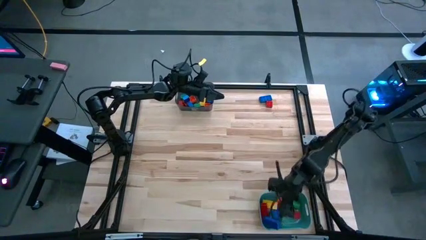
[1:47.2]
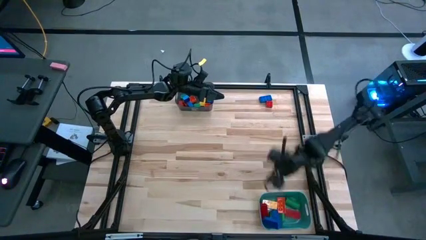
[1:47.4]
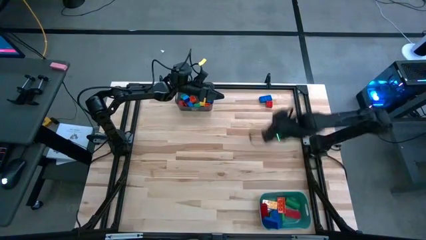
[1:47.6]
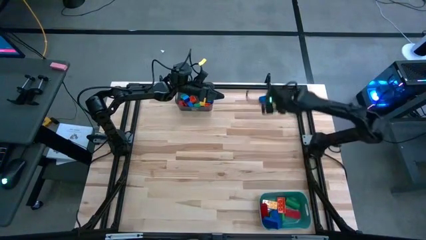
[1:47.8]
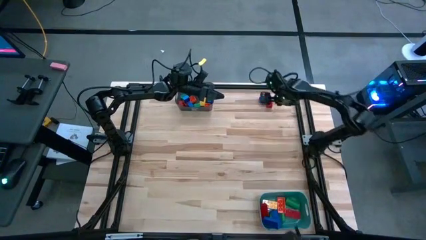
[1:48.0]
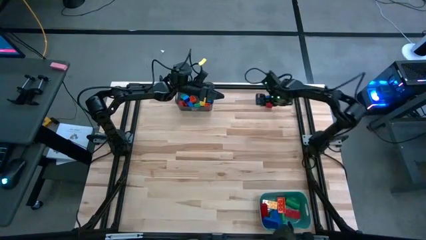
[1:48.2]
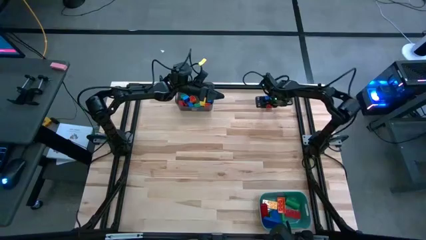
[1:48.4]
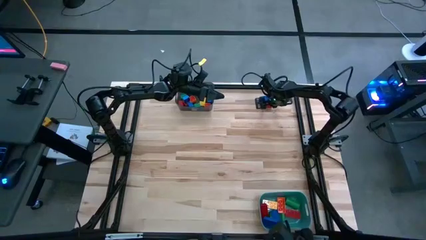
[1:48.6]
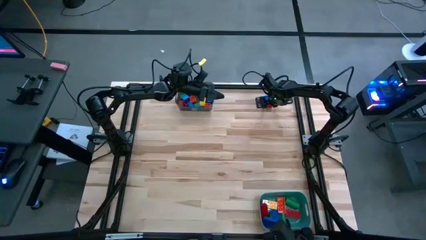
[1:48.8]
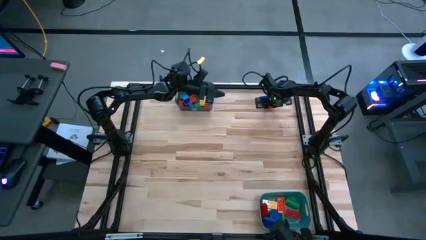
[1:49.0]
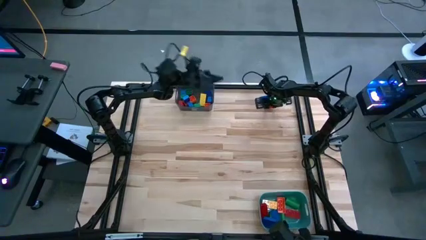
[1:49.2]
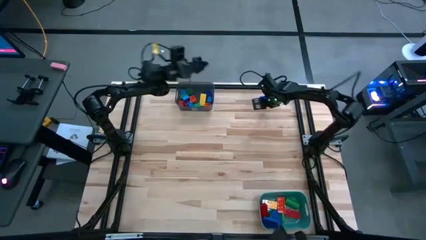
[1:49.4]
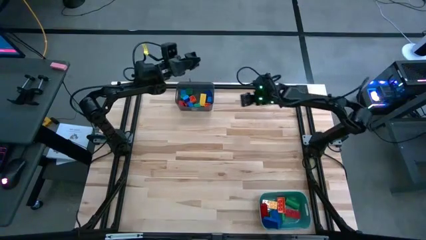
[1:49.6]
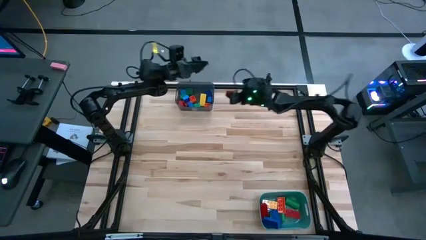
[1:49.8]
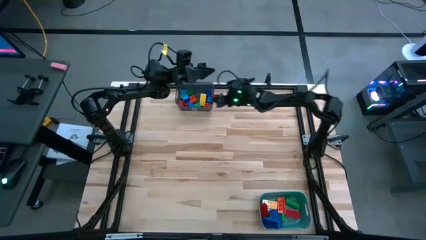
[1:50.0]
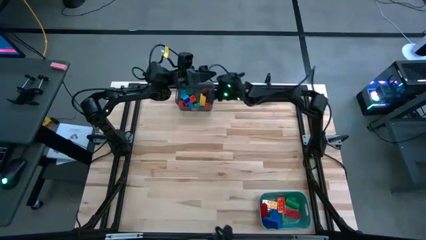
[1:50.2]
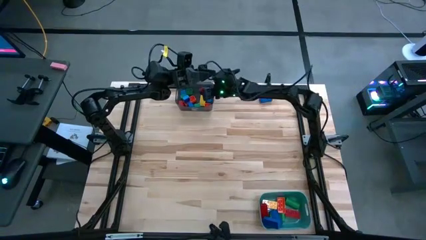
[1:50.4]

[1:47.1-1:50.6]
Task: Sort blocks by size
Put the red game piece into the black bin

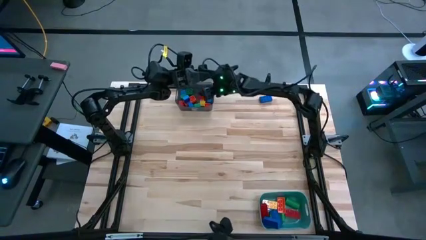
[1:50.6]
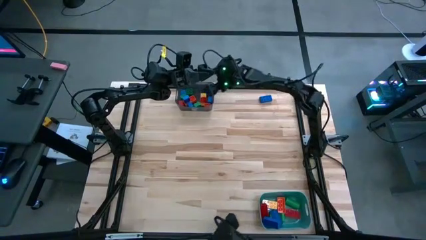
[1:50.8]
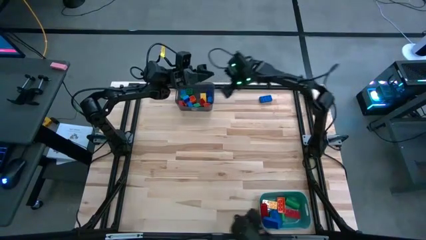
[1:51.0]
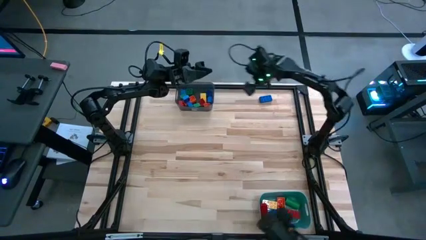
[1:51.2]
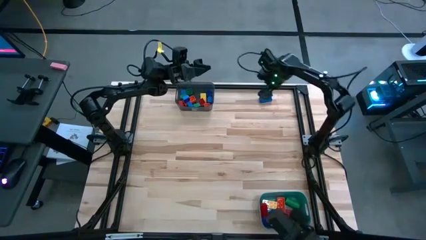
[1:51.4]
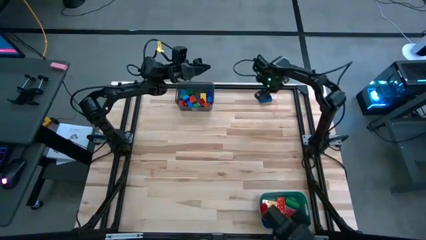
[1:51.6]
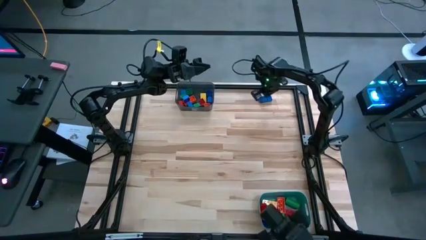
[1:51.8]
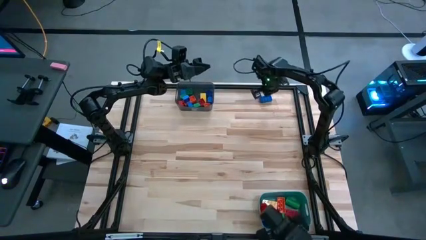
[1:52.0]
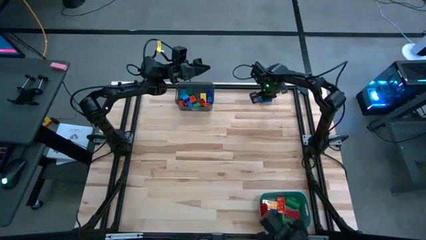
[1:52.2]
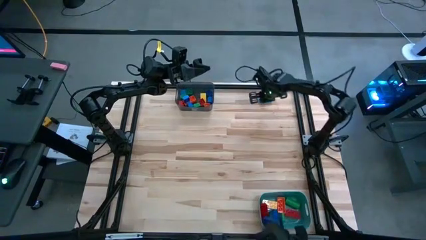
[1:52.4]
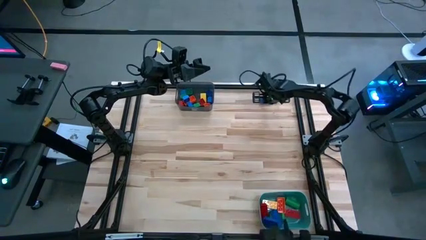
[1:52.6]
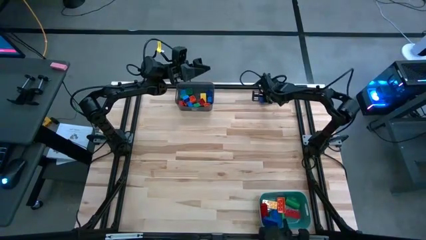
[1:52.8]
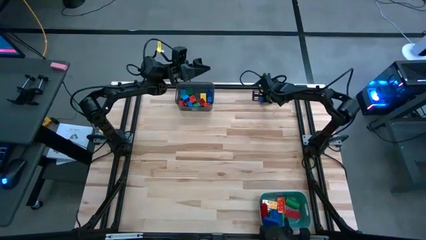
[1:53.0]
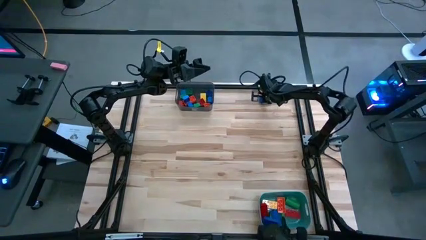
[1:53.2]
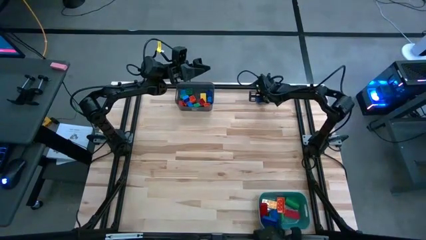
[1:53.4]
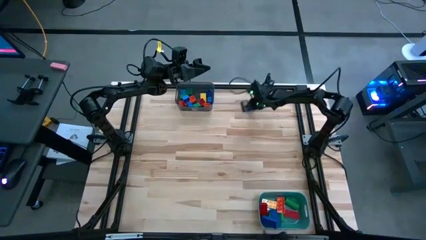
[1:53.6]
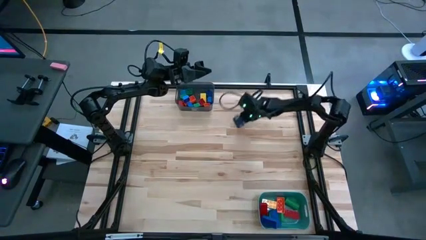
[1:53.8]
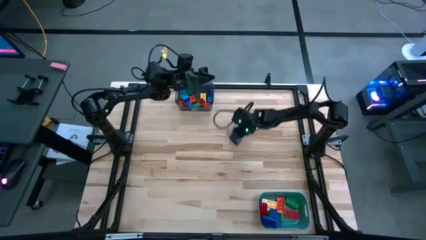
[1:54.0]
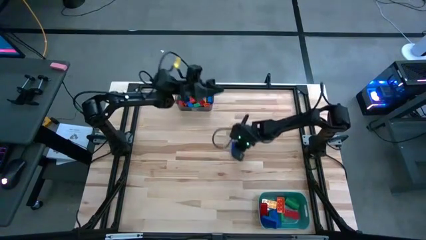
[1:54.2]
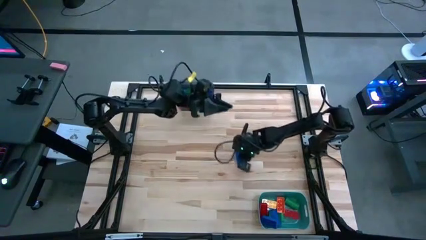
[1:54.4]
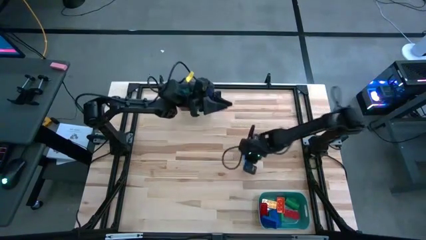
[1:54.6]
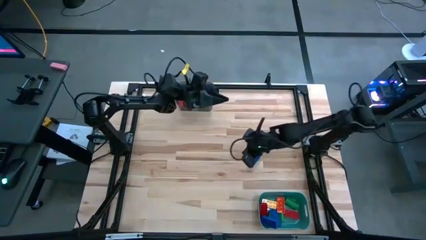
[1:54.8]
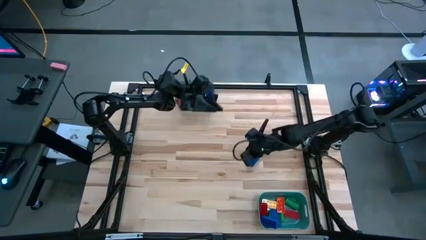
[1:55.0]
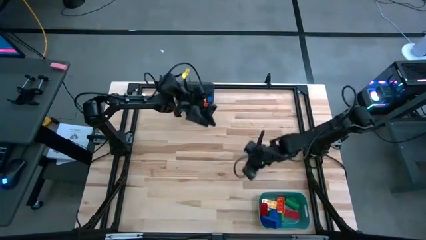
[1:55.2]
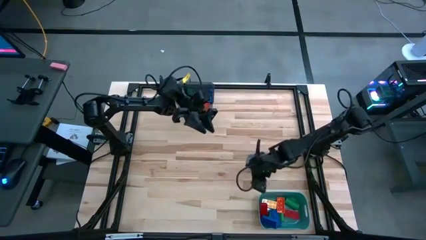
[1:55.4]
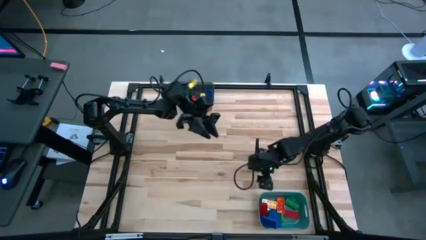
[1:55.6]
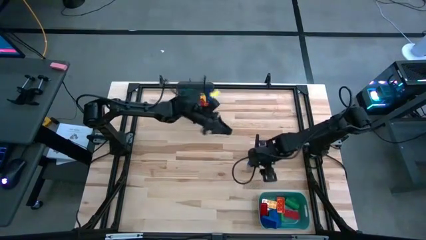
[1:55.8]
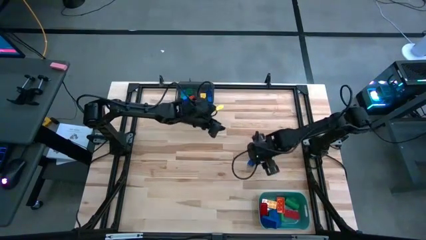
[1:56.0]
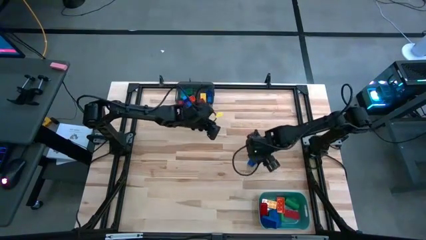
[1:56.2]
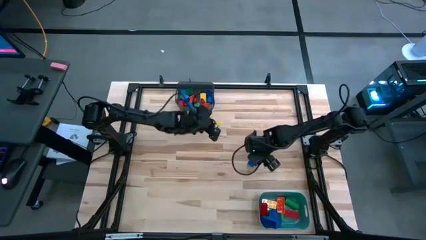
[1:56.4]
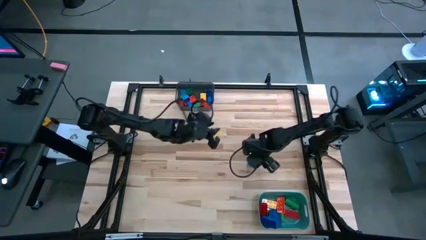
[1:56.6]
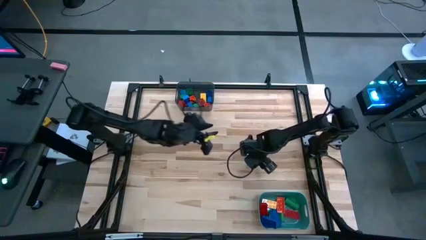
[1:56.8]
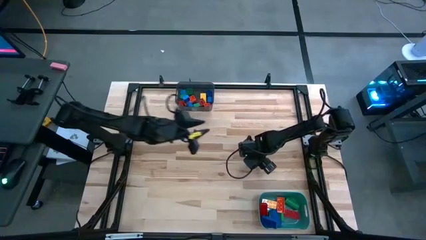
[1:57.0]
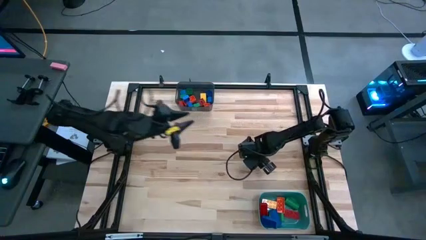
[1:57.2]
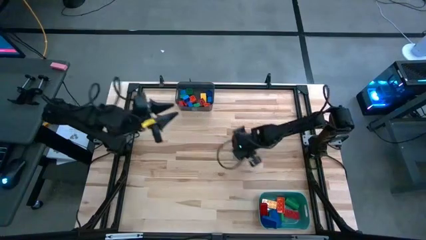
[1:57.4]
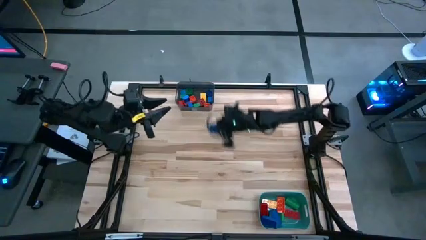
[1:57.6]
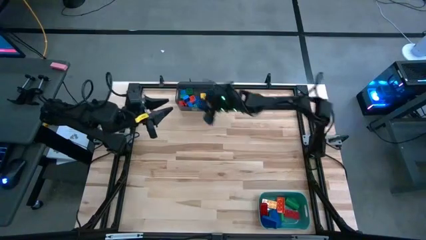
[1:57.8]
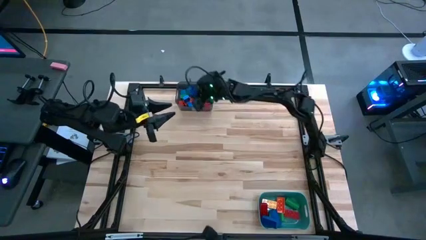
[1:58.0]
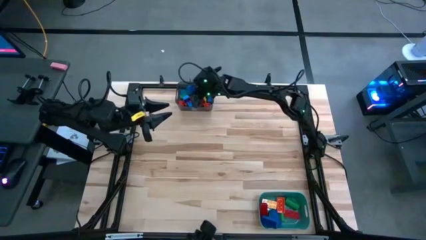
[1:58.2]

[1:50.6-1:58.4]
Put the blue game piece into the black bin

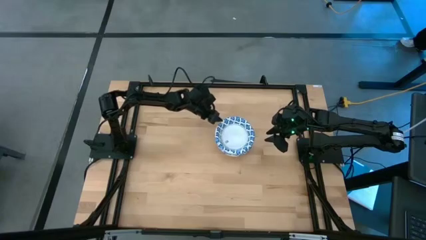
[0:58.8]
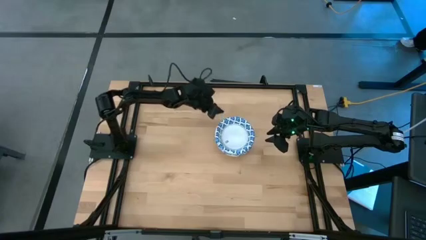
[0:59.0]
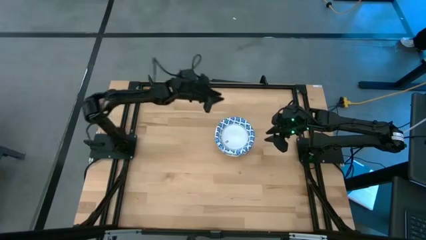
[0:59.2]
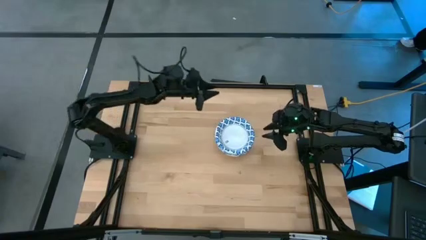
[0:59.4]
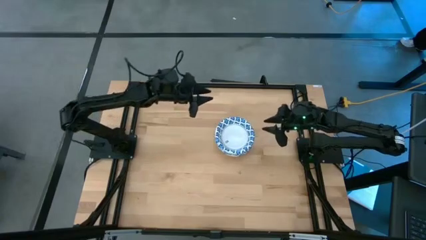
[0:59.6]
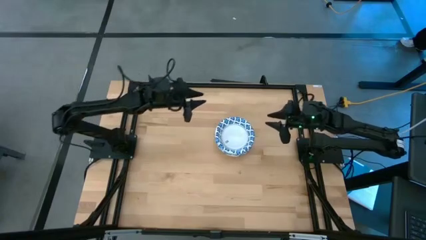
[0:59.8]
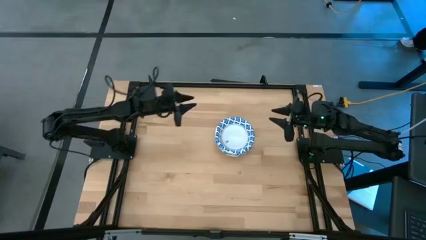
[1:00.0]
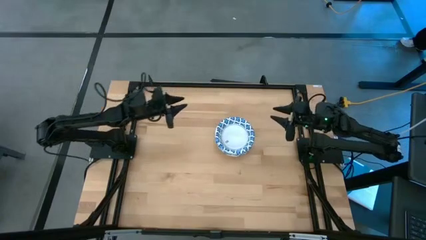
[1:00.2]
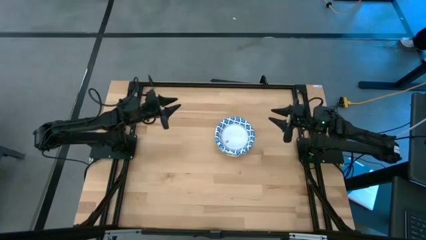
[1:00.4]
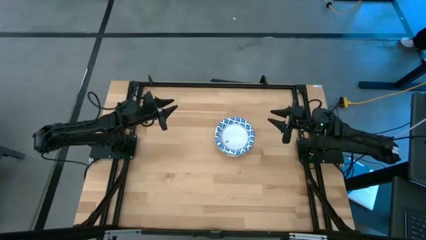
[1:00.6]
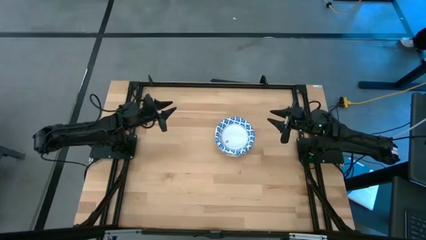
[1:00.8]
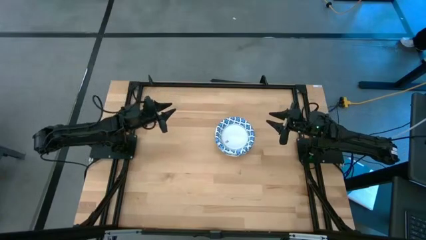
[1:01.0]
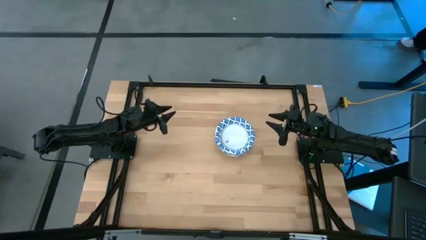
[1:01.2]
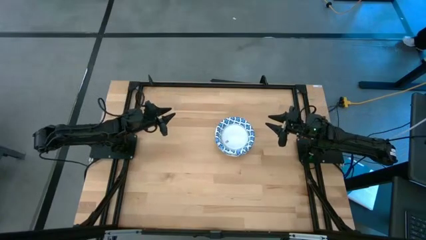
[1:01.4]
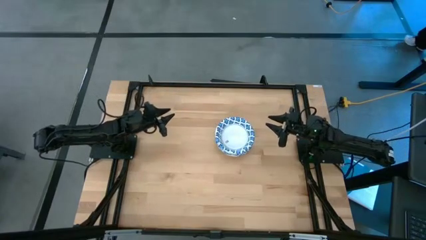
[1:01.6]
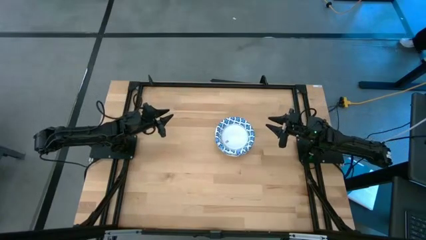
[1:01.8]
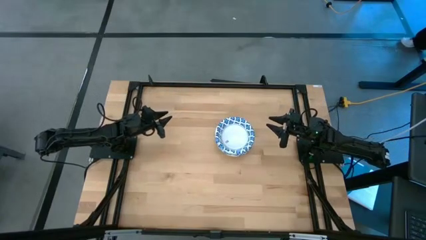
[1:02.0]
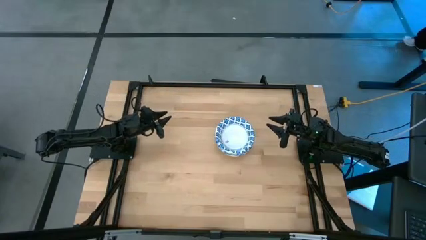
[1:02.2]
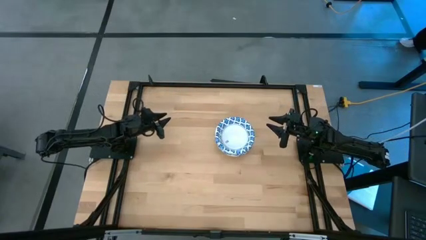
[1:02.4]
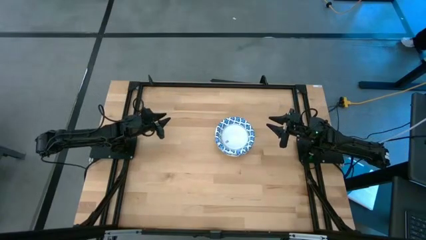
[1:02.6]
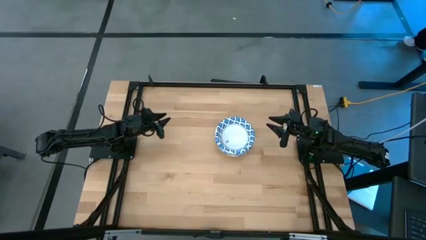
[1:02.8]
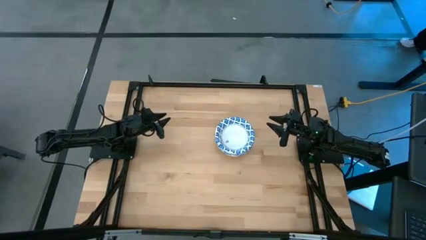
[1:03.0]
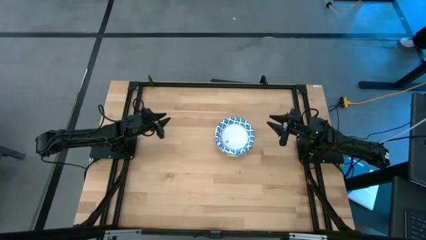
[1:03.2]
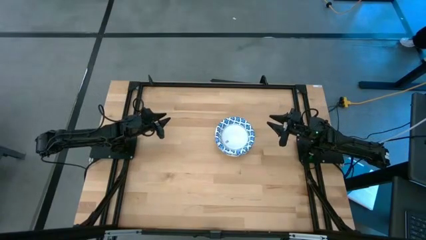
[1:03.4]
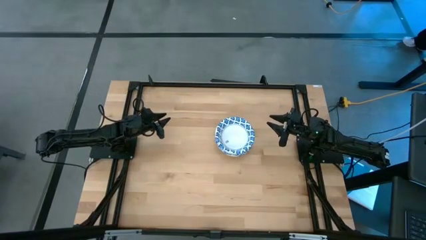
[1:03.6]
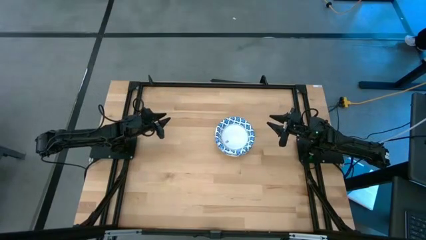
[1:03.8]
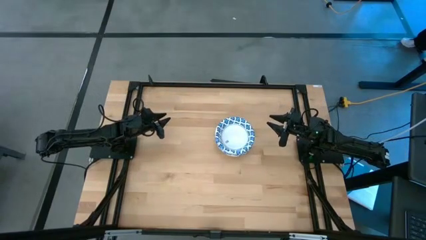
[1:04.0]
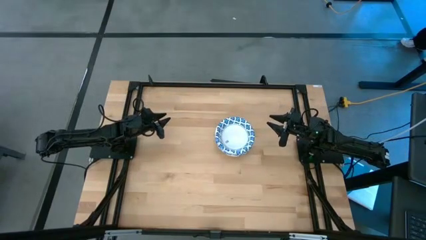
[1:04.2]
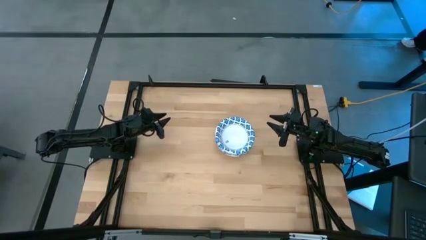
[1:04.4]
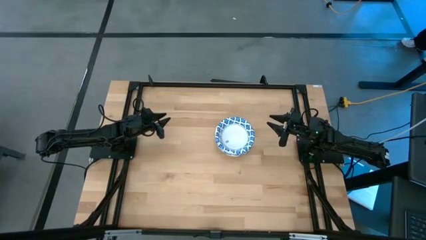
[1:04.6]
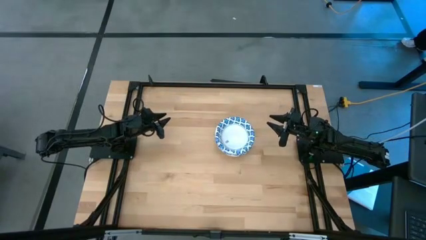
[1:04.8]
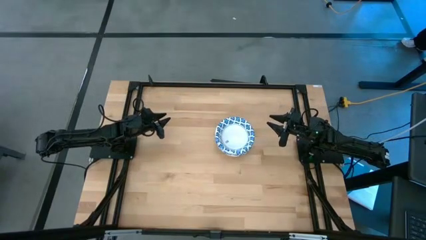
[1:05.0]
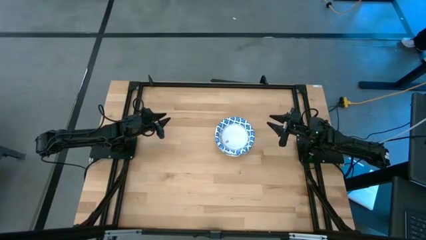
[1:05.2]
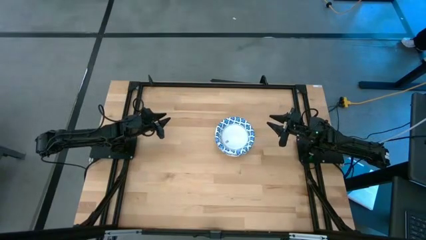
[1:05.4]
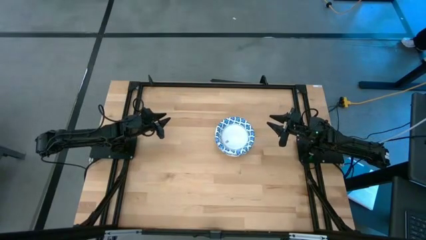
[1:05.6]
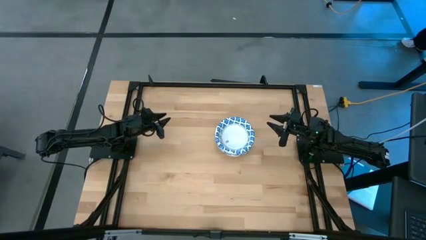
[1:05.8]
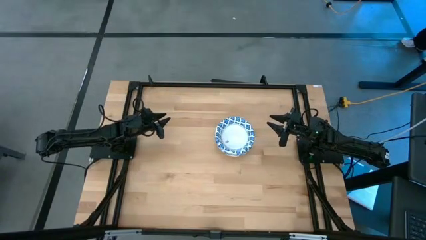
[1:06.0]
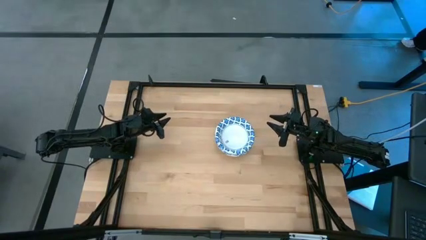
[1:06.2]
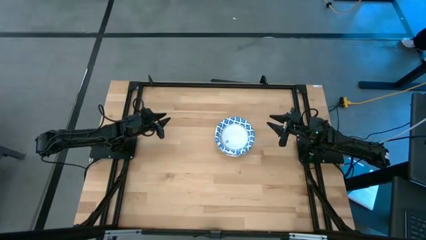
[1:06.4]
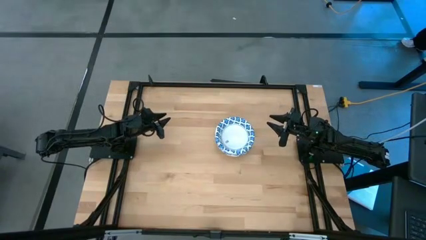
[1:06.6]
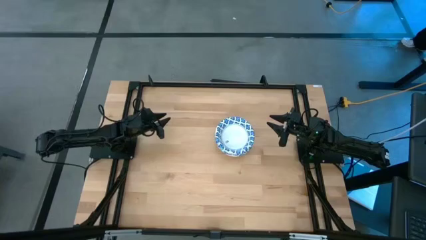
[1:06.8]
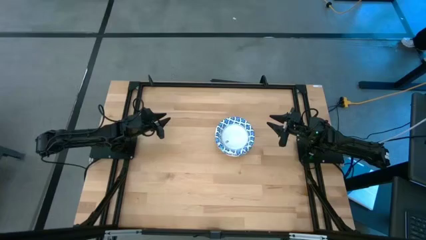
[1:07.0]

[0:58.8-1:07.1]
Task: Nest bowls inside each other
Return to Home Position
